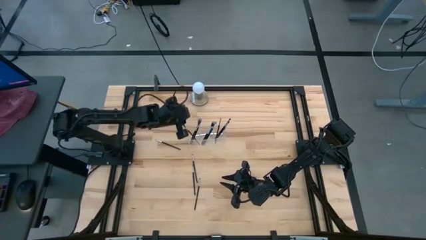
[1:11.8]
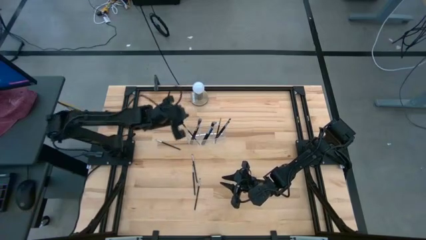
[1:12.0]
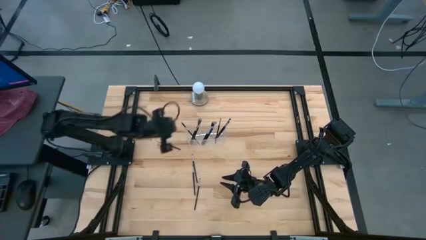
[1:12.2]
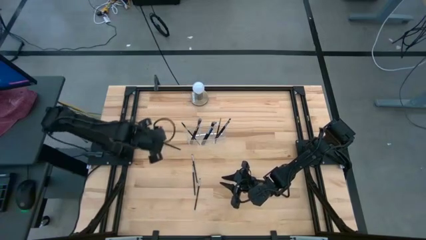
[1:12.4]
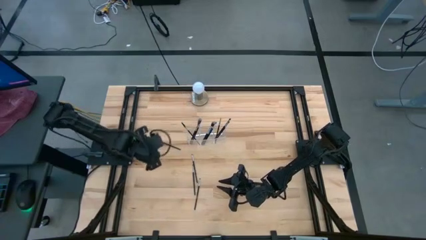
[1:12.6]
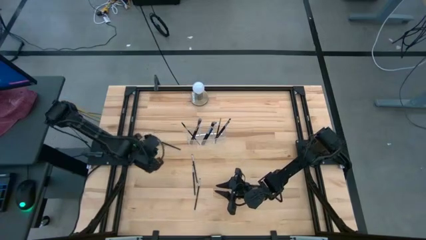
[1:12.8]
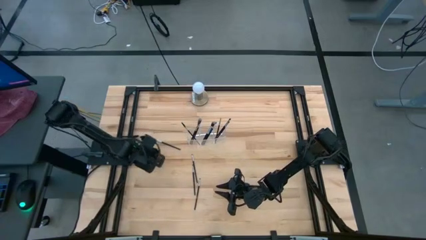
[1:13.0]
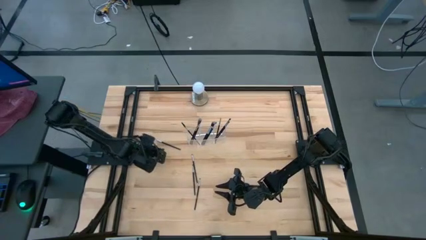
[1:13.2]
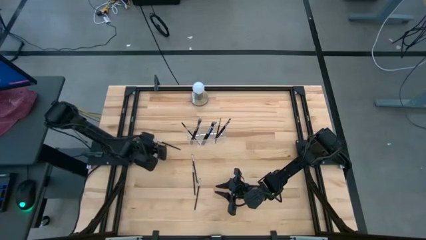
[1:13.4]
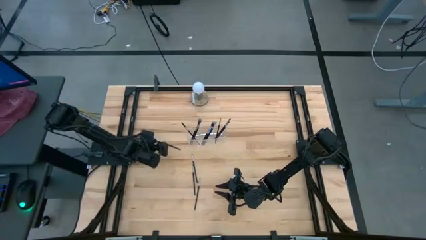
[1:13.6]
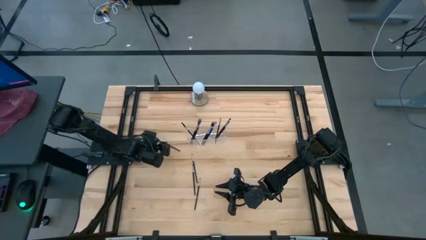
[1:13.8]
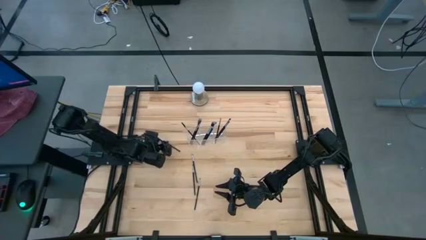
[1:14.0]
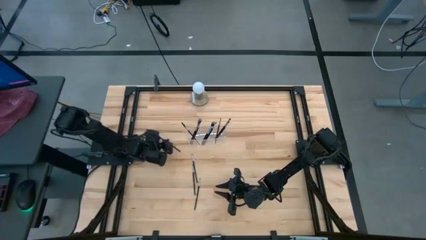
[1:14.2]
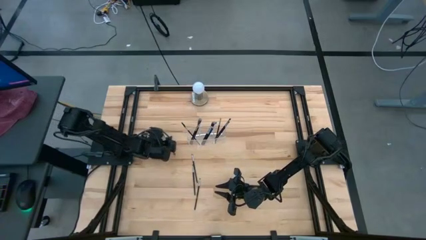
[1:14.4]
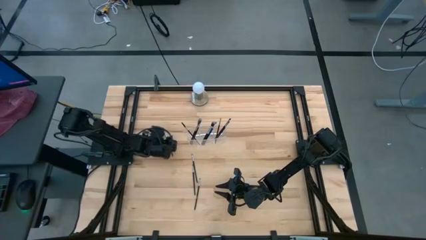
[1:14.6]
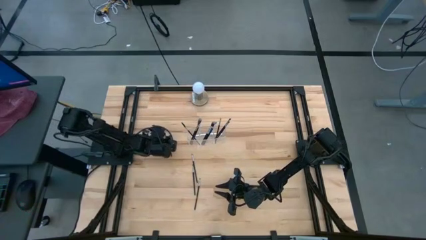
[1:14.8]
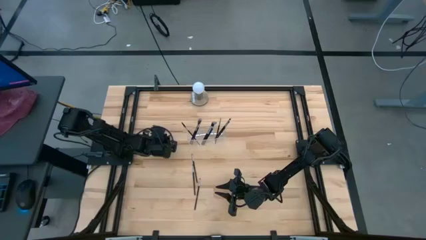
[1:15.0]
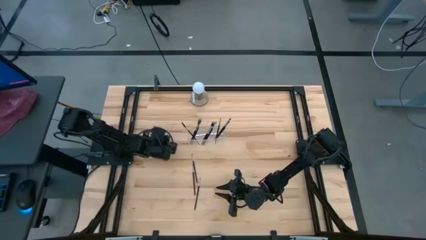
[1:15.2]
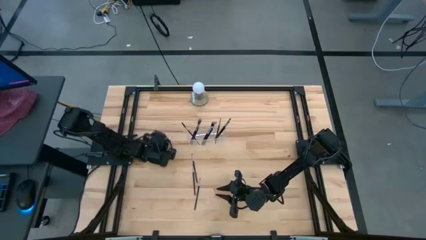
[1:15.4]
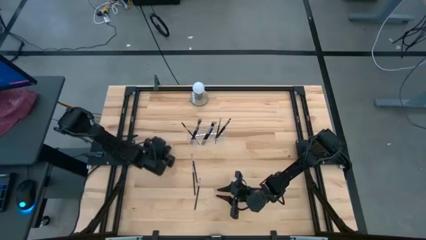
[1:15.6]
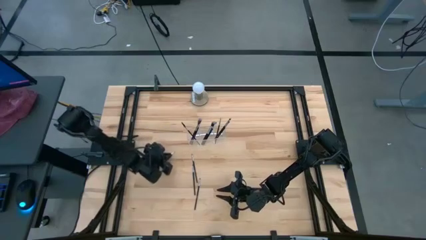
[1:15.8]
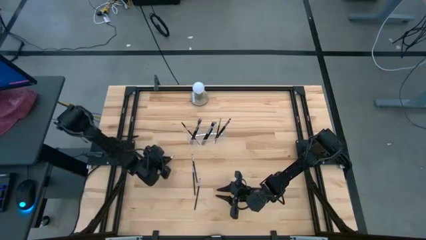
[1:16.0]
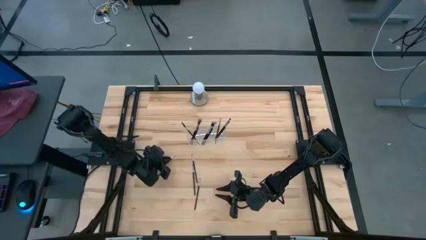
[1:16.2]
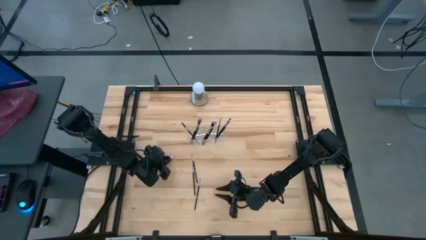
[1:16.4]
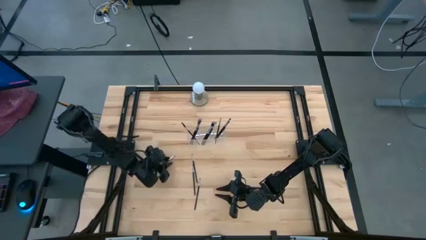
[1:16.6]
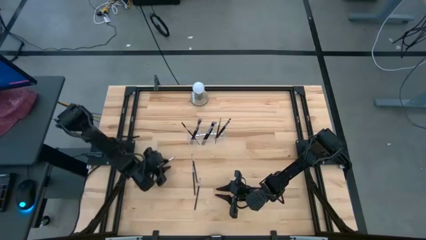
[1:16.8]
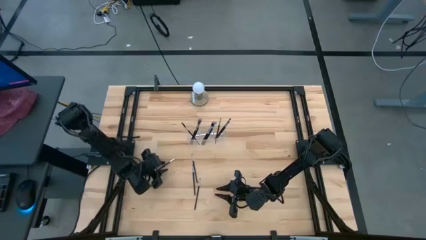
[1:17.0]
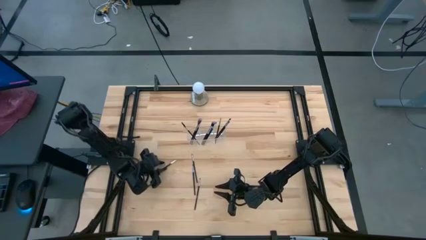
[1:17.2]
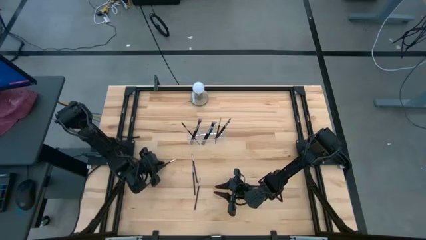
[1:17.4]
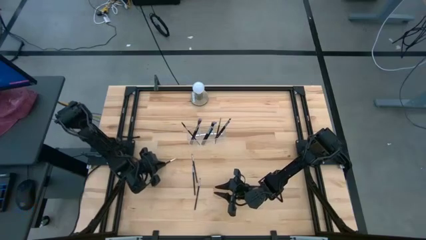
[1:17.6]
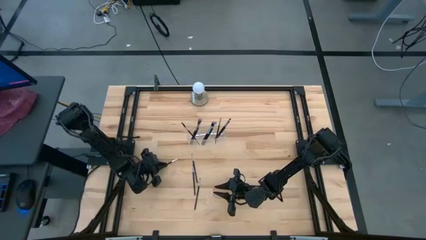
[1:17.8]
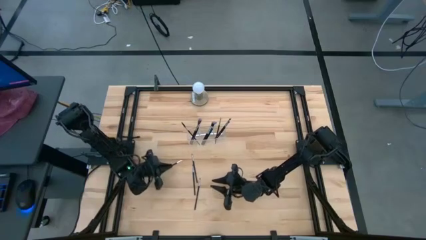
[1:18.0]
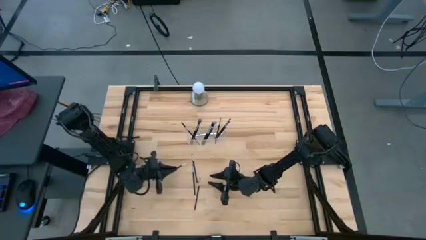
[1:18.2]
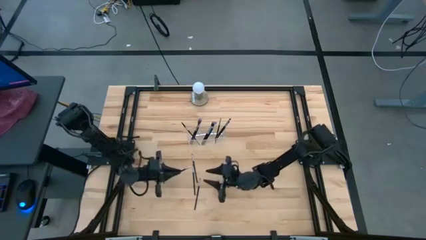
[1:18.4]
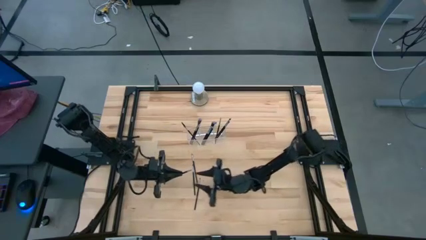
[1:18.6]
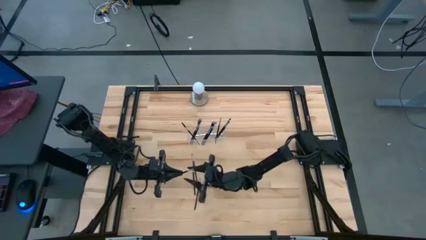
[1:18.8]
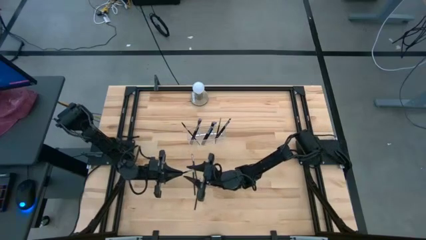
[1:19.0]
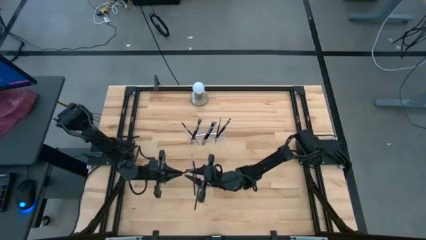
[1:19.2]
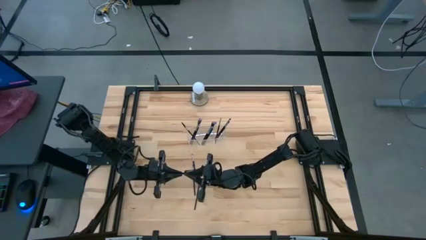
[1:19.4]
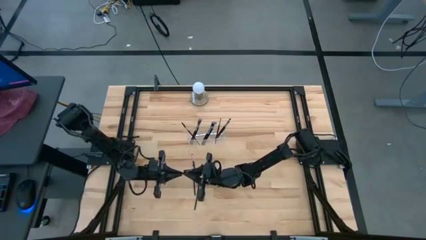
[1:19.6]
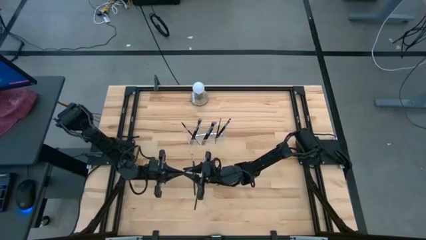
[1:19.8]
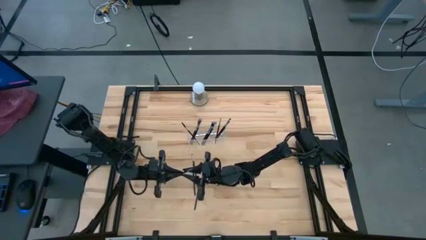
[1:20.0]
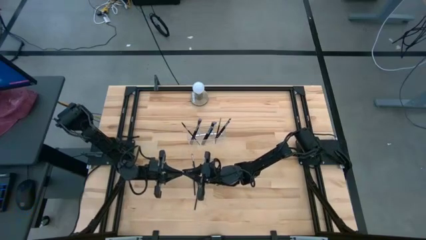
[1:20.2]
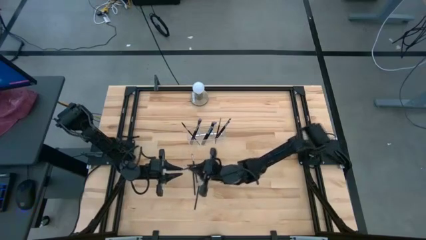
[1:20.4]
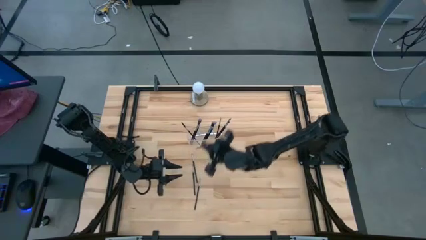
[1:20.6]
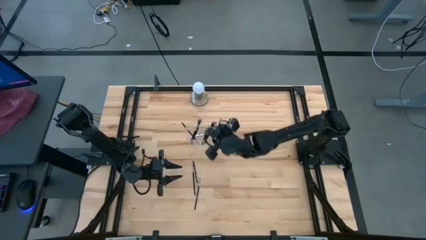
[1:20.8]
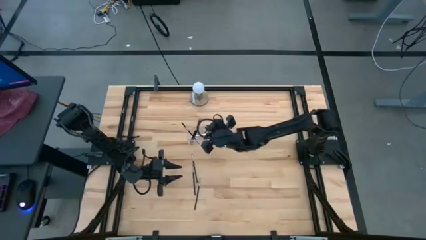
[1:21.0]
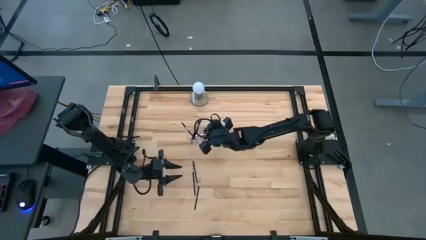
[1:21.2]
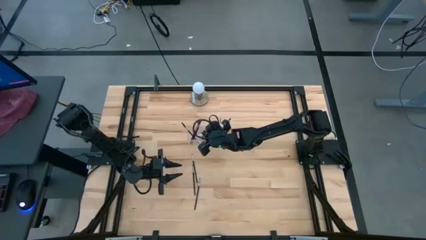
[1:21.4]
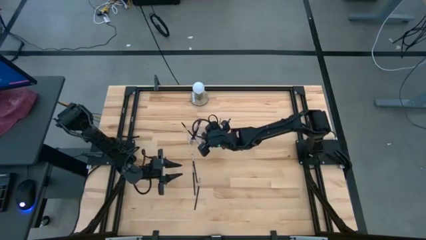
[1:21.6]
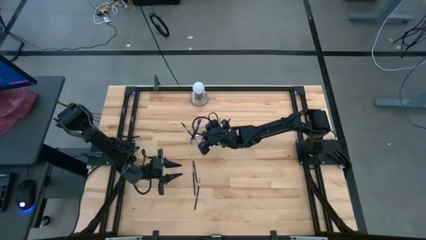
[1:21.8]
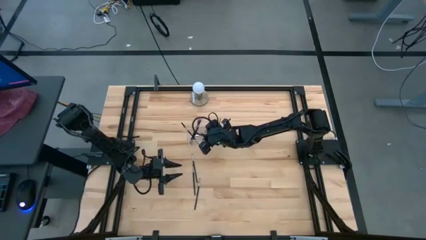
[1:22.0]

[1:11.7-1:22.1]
Task: Put items in baskets/containers
Put the liner brush into the transparent organizer

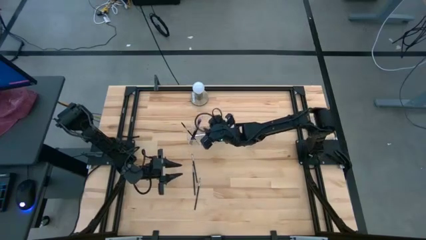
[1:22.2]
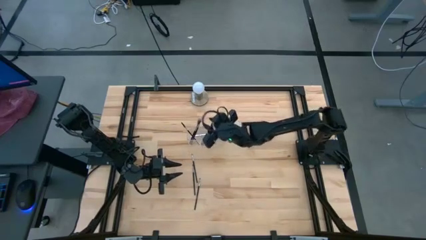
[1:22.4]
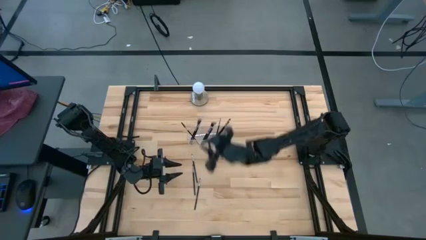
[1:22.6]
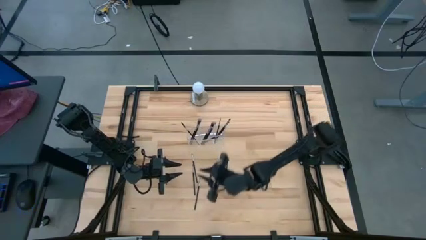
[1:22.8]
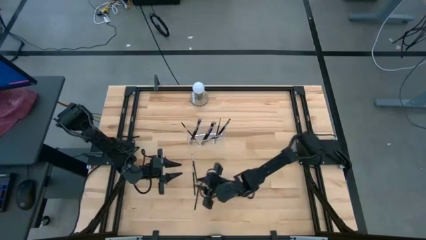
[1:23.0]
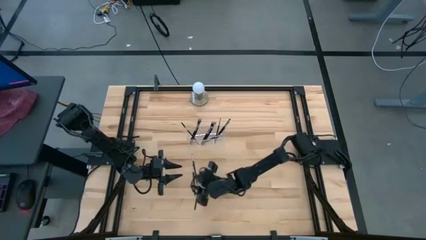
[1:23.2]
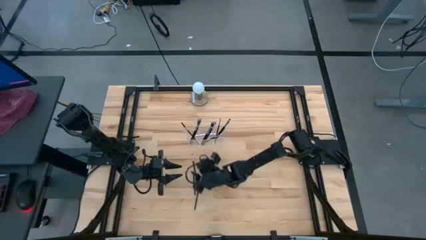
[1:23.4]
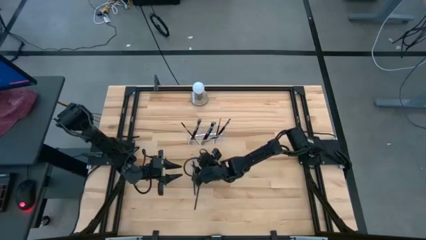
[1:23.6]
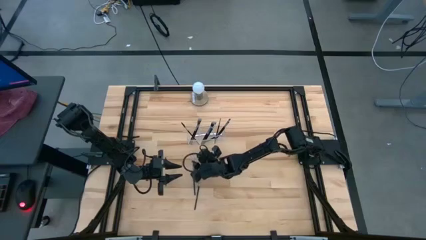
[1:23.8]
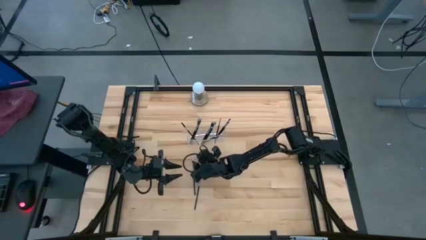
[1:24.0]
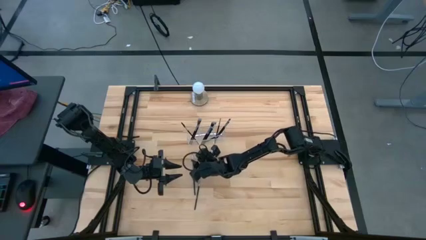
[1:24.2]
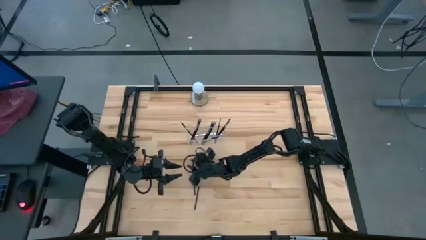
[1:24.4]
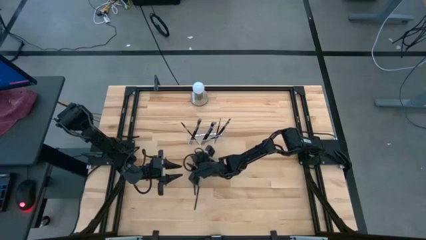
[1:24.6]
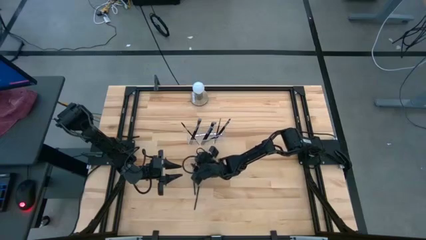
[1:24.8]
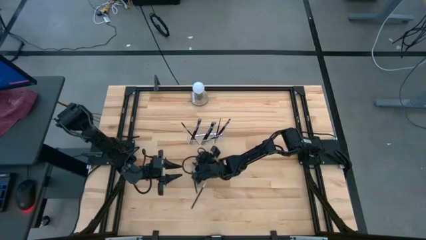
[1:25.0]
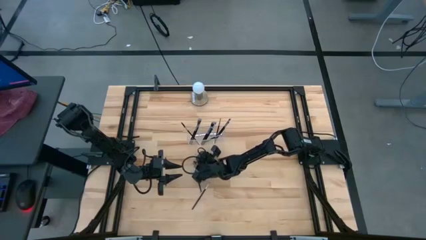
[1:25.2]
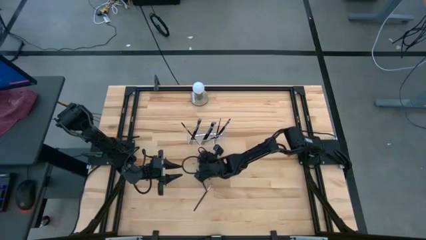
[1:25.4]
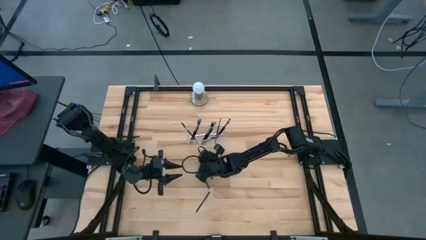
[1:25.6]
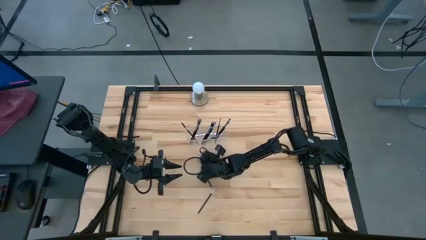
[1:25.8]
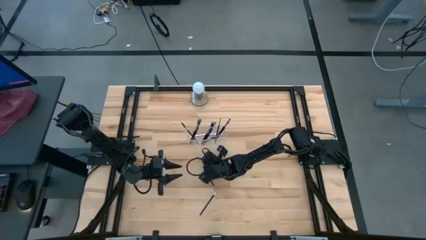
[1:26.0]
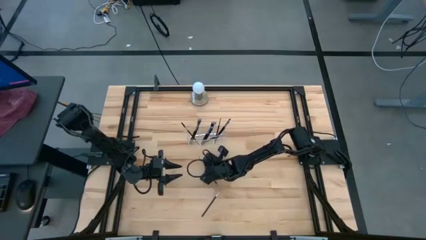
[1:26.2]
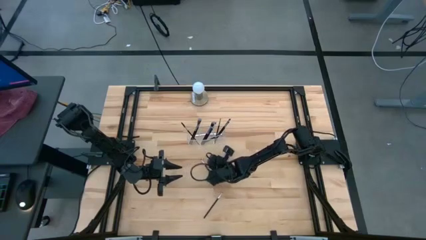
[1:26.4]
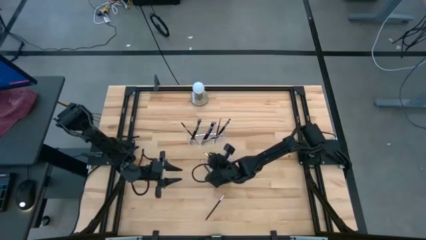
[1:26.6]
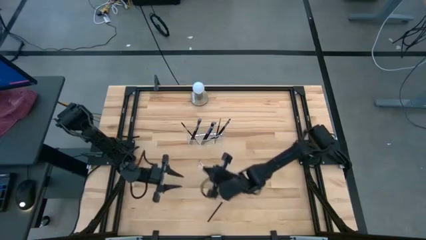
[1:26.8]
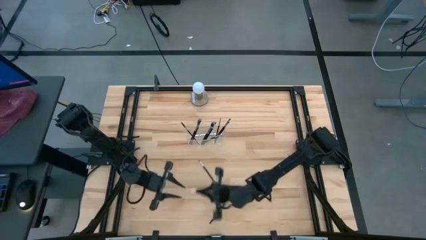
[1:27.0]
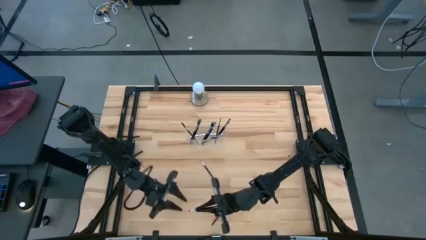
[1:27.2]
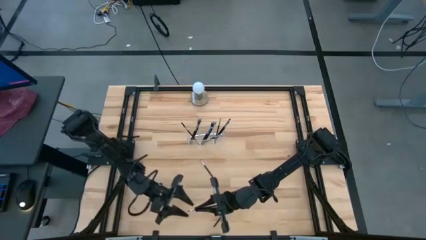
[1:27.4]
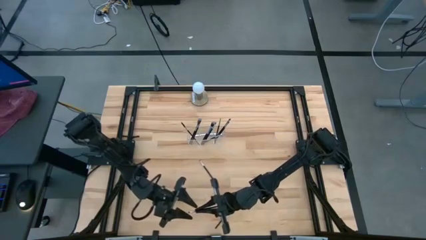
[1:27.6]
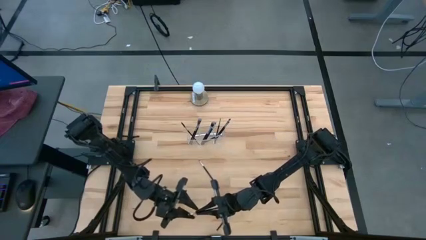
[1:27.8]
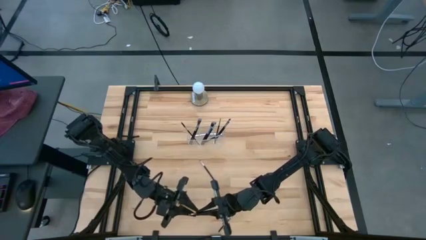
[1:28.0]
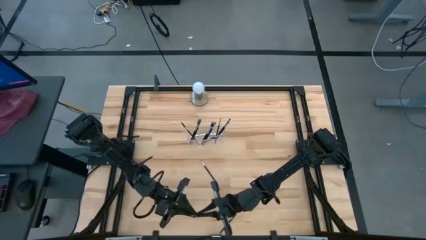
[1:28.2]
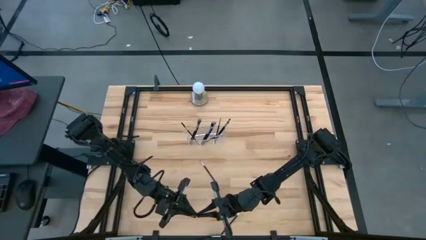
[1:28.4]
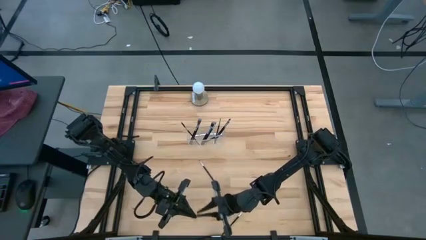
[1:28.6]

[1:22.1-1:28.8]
Put the eyeshadow brush into the transparent organizer
